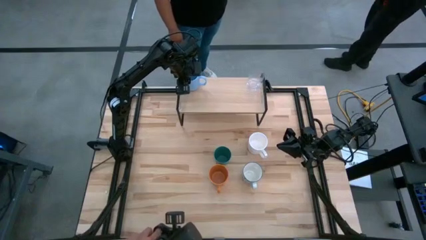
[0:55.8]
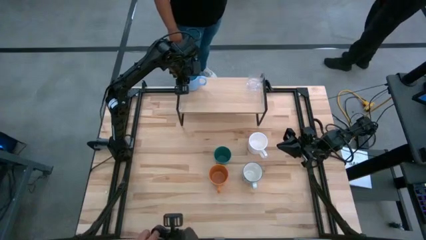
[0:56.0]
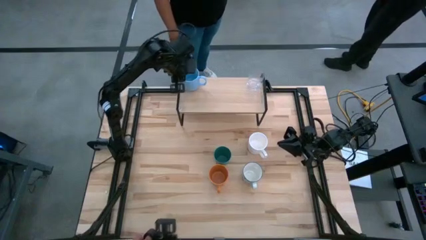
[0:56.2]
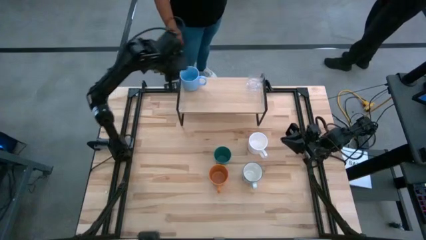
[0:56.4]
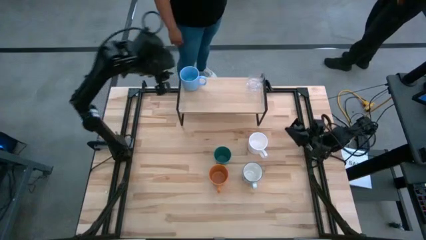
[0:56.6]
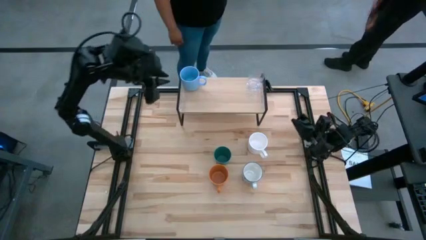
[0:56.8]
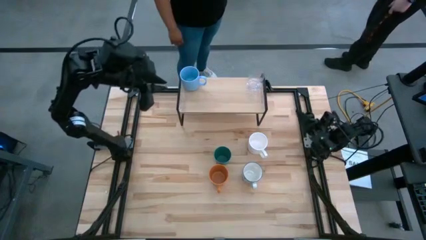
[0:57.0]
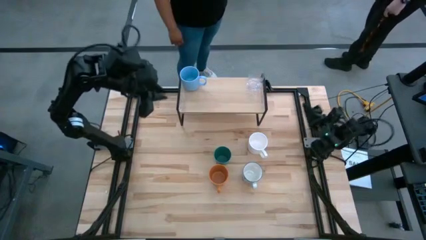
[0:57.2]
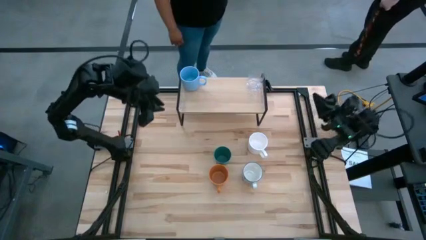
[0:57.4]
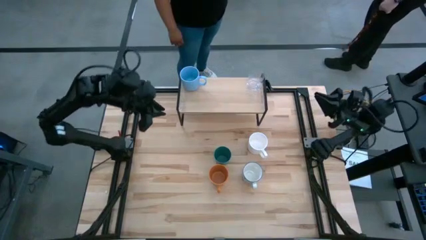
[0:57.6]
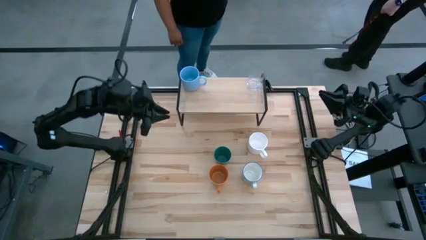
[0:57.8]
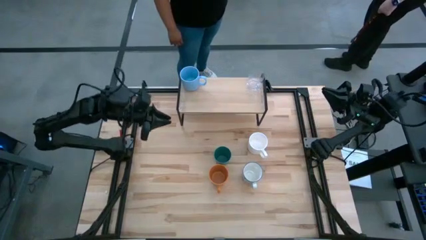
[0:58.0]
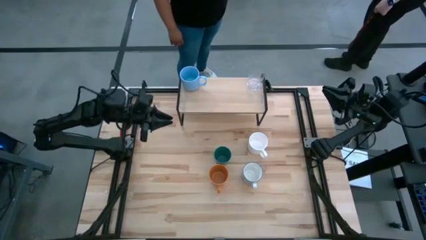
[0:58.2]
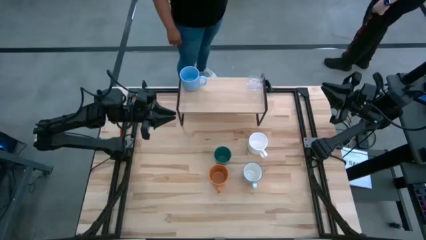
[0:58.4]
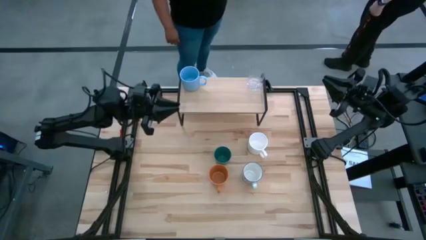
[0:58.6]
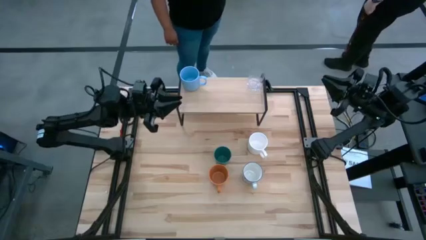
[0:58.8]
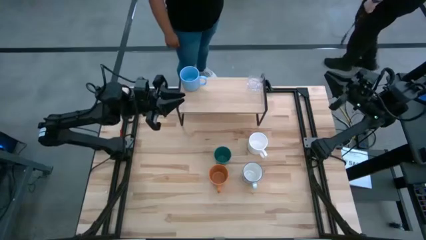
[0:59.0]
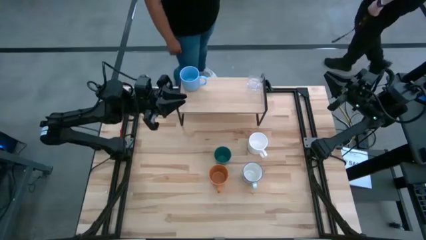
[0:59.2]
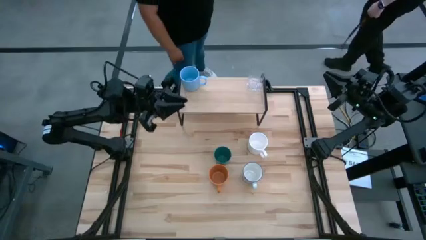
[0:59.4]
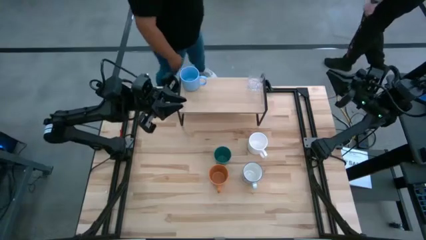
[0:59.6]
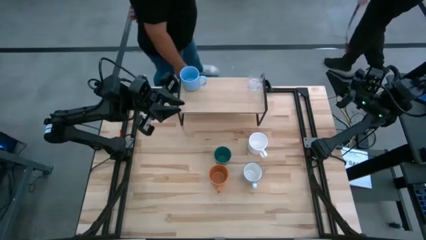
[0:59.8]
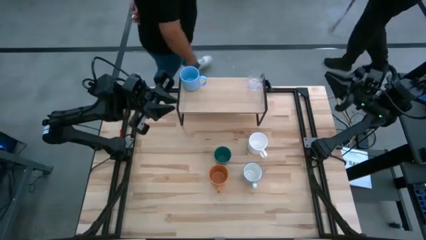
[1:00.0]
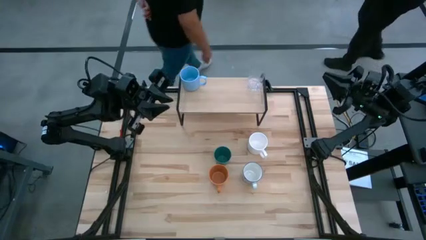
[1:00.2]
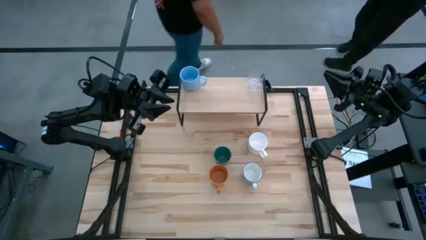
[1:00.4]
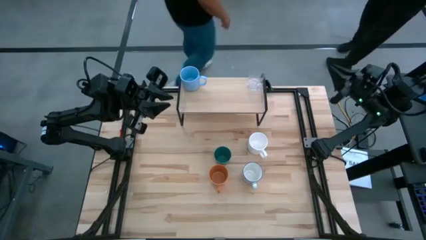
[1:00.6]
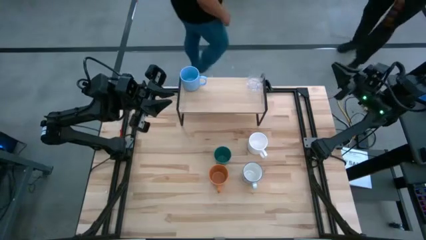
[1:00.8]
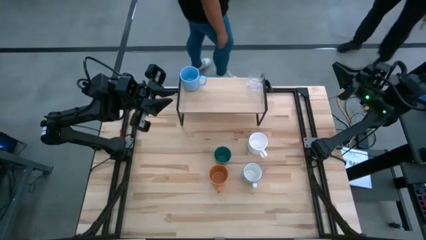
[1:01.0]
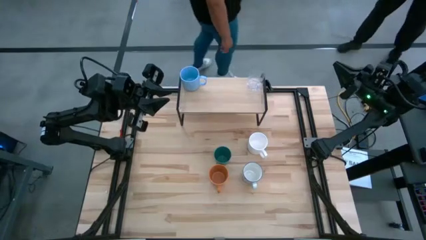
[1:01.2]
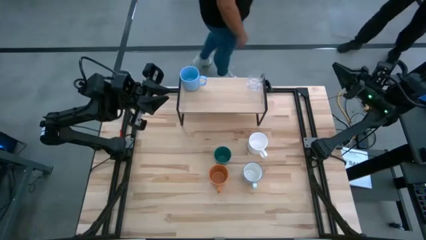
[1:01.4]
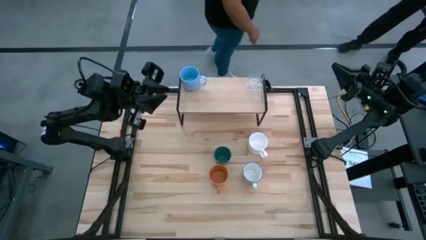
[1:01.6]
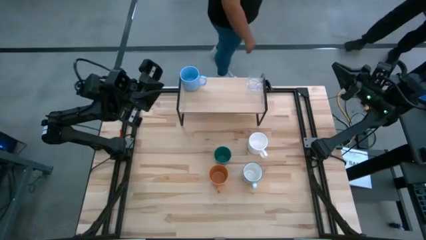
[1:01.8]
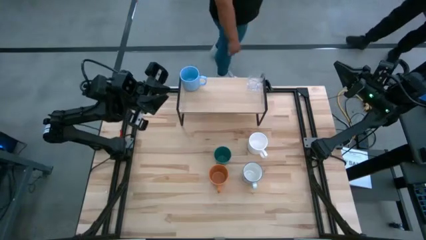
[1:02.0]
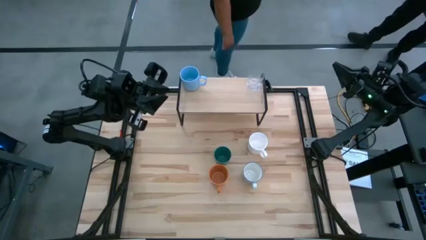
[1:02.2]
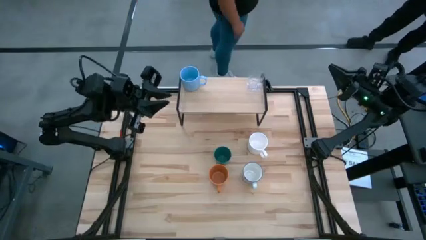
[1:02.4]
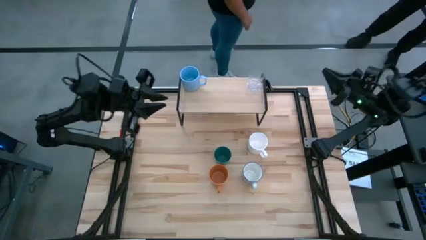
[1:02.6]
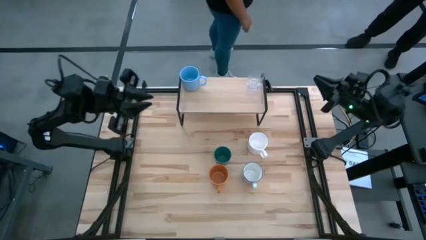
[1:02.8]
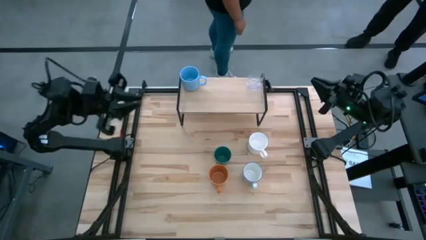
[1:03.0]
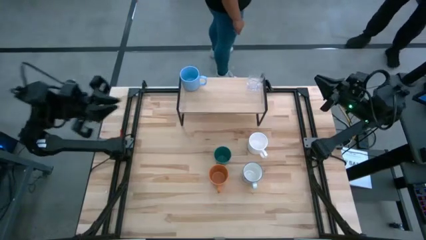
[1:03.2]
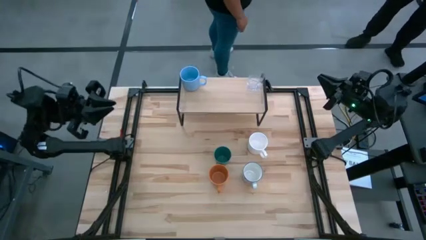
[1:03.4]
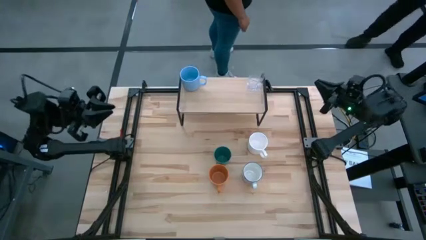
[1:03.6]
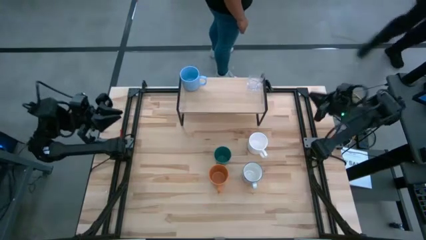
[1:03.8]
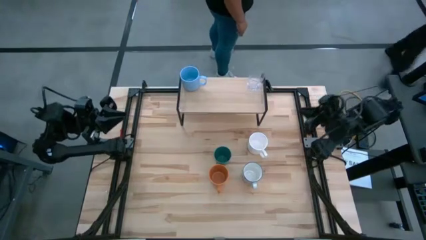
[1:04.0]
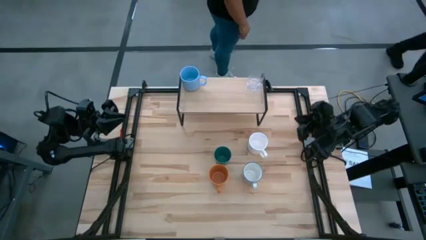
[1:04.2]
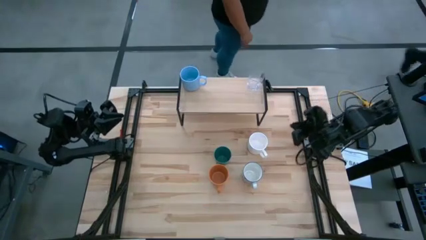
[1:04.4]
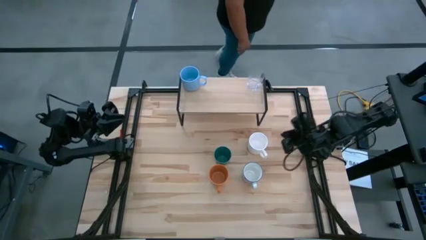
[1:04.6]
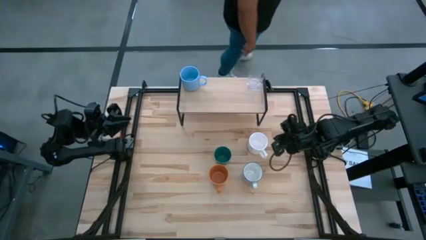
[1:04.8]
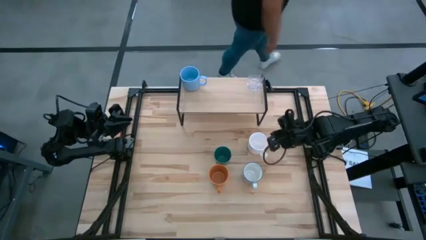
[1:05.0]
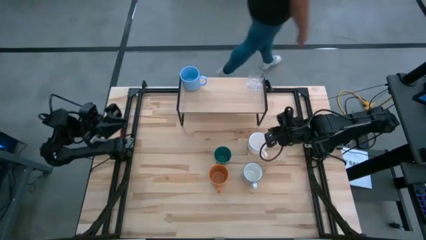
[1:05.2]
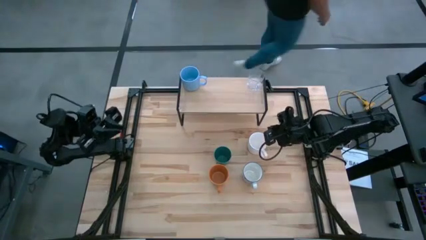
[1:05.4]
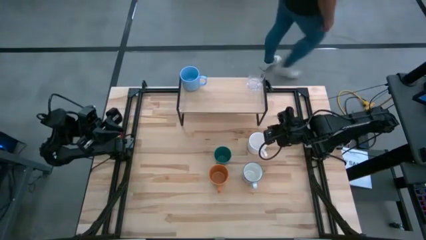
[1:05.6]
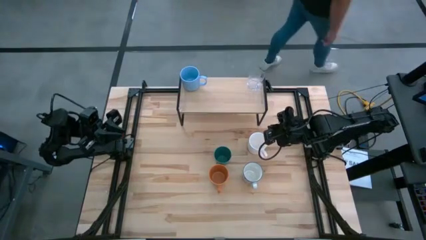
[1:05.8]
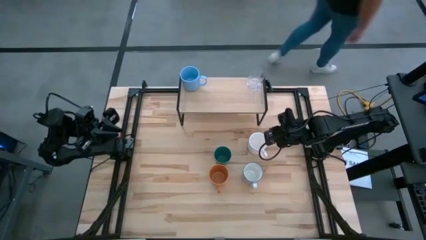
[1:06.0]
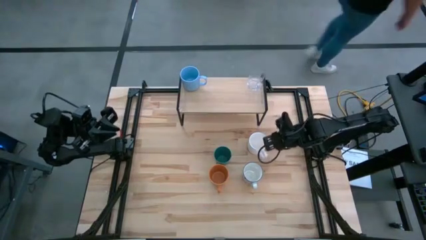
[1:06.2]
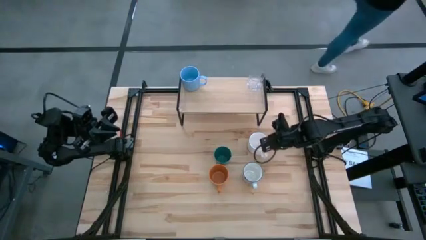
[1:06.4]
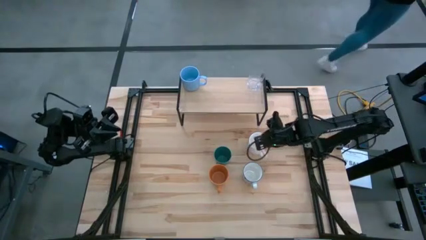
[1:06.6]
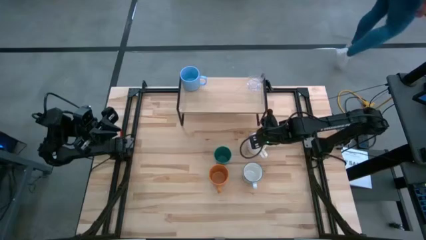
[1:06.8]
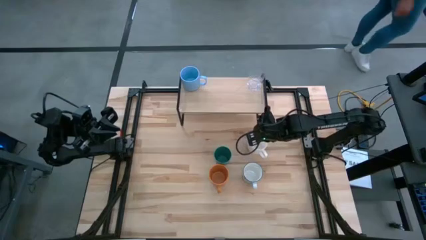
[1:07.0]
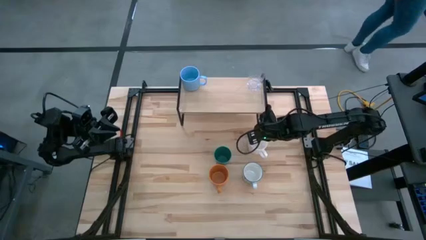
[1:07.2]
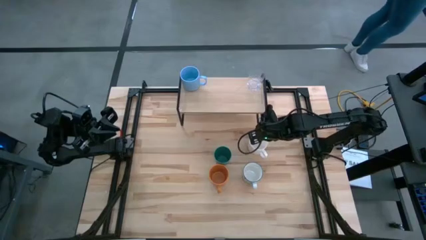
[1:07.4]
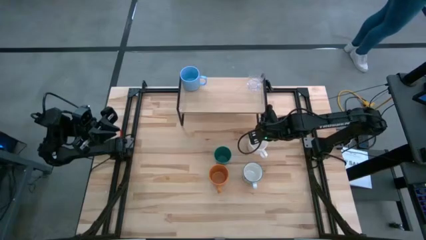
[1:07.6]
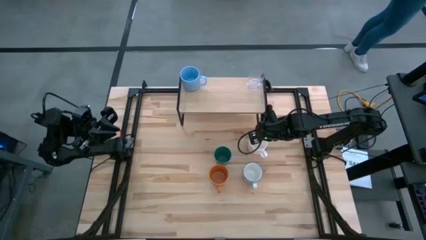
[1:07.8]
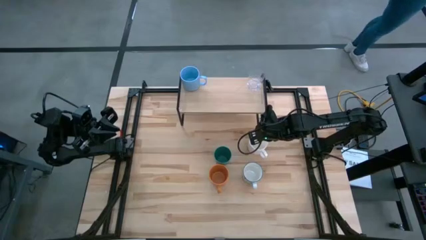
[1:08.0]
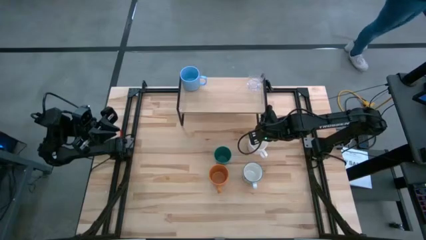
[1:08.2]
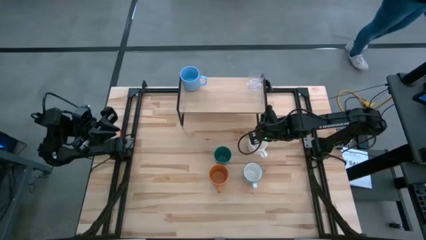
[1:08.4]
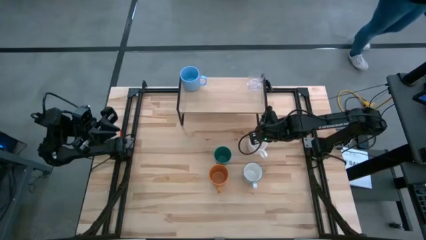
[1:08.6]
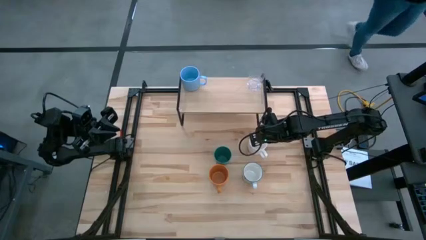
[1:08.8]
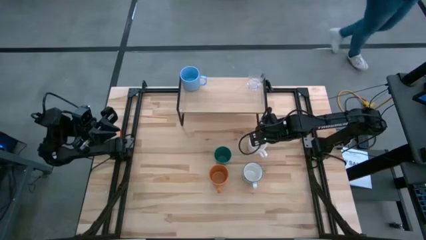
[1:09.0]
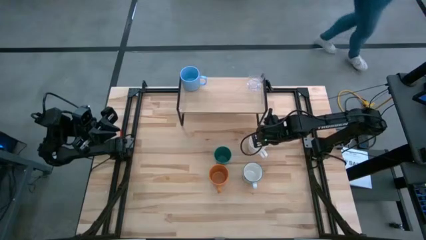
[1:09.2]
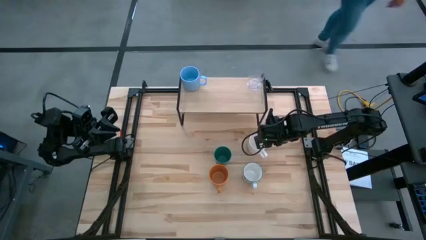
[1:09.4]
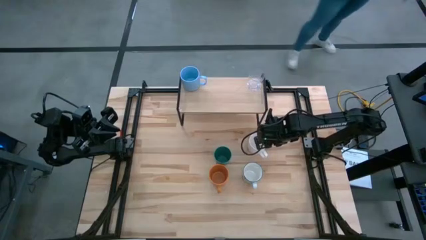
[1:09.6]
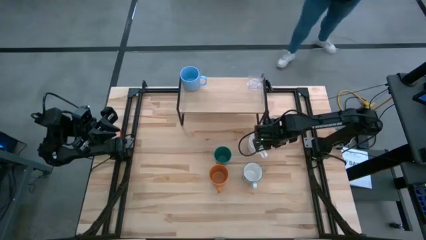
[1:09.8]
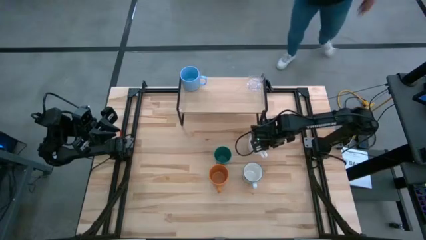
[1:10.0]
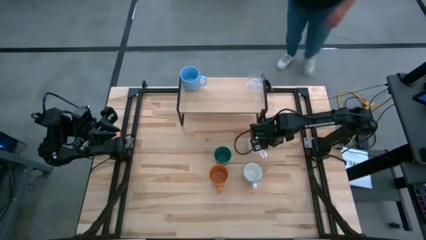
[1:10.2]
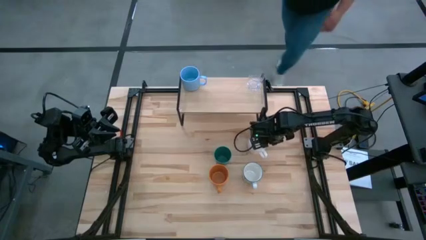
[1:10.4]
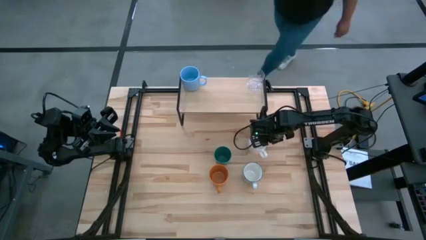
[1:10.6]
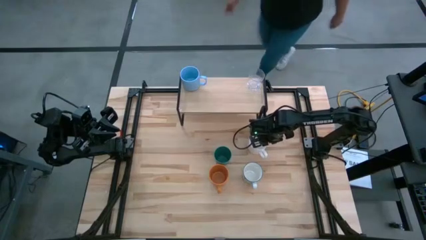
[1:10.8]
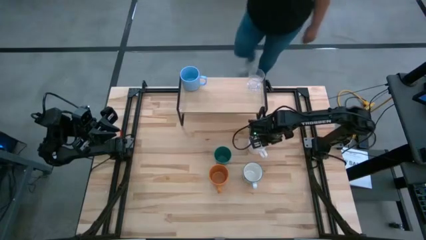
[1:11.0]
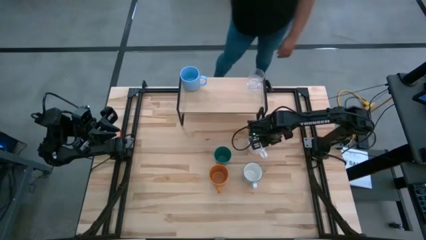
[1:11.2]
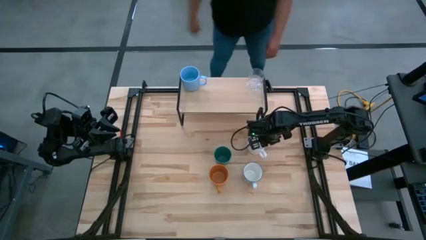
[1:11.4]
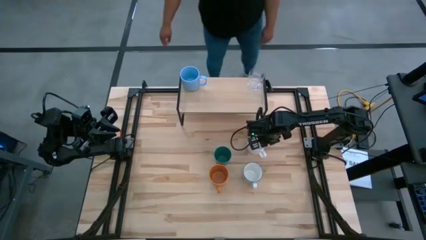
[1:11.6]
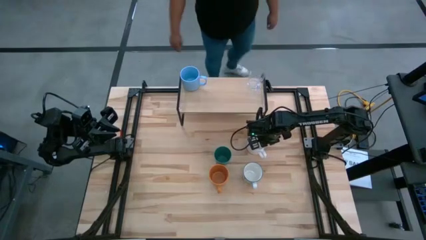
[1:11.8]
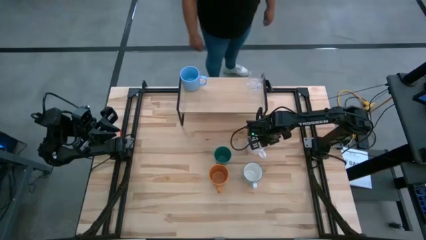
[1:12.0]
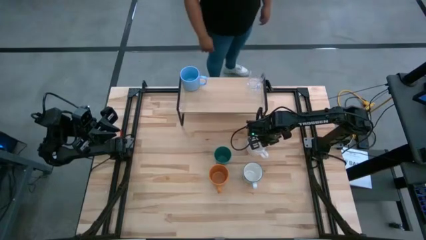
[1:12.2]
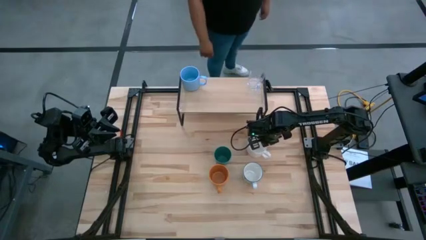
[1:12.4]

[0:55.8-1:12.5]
Task: Stack small to large cups/mugs on shelf
Put the white mug on the shelf
